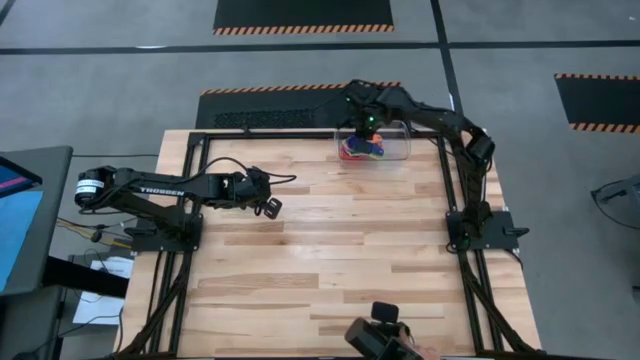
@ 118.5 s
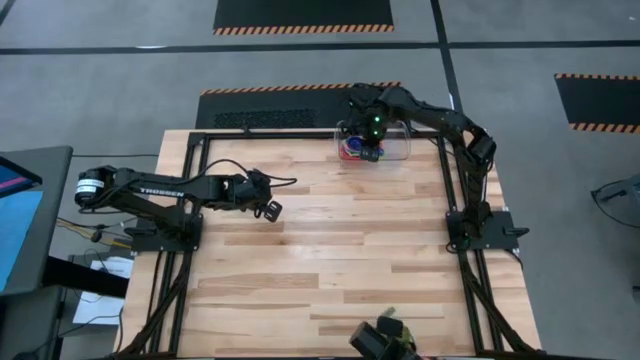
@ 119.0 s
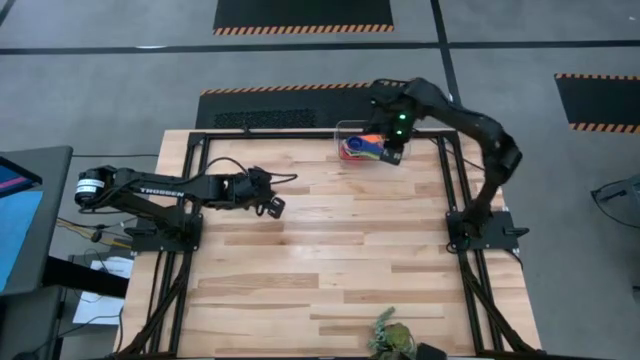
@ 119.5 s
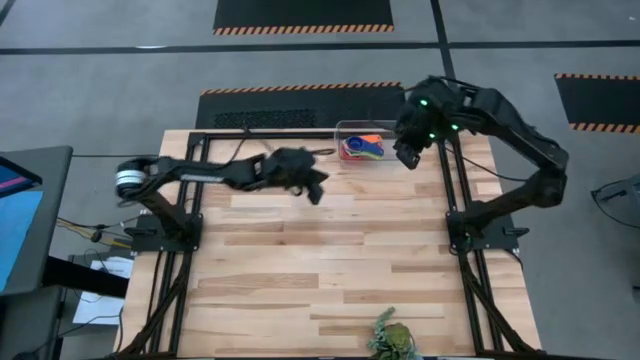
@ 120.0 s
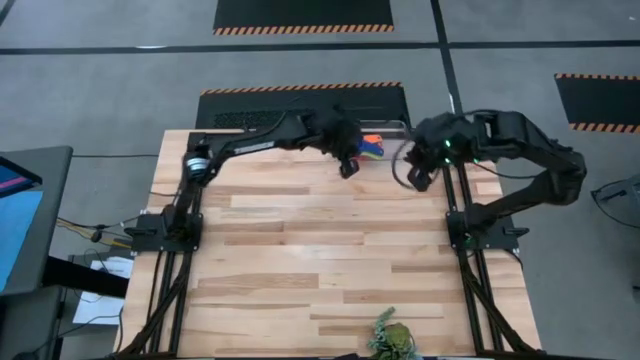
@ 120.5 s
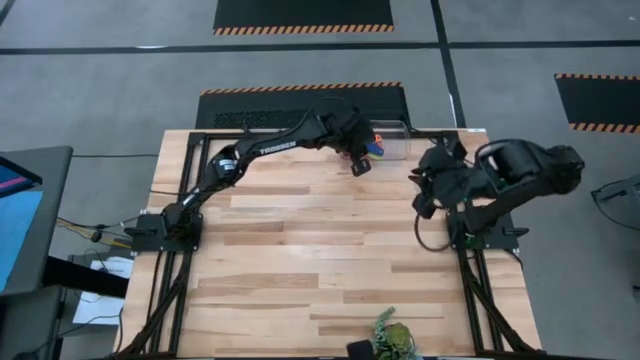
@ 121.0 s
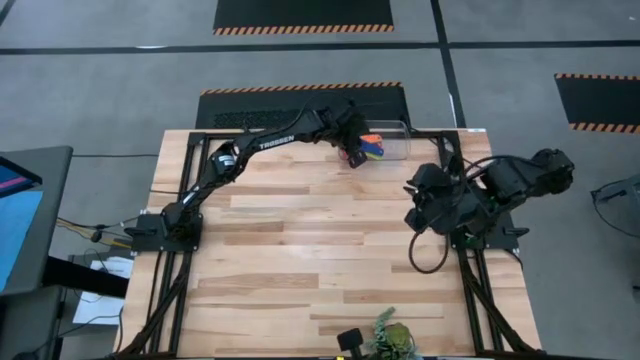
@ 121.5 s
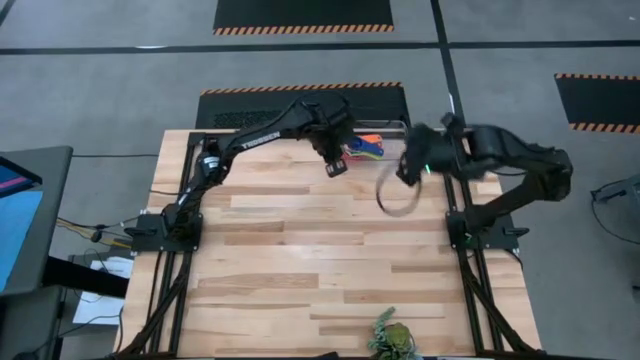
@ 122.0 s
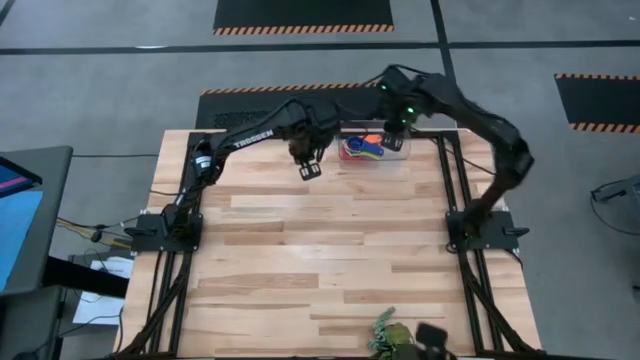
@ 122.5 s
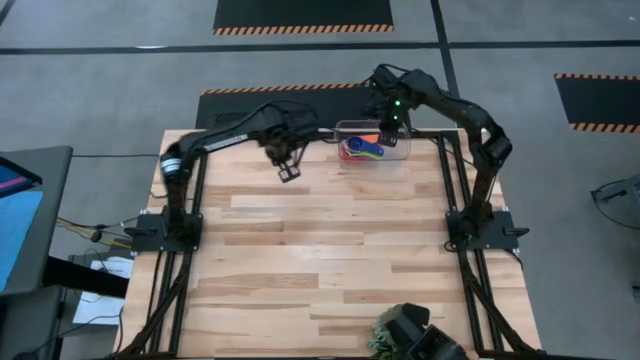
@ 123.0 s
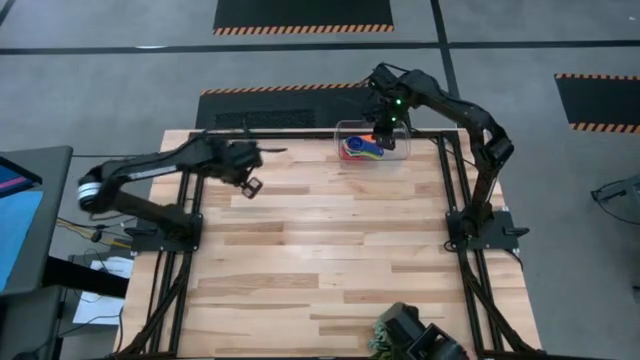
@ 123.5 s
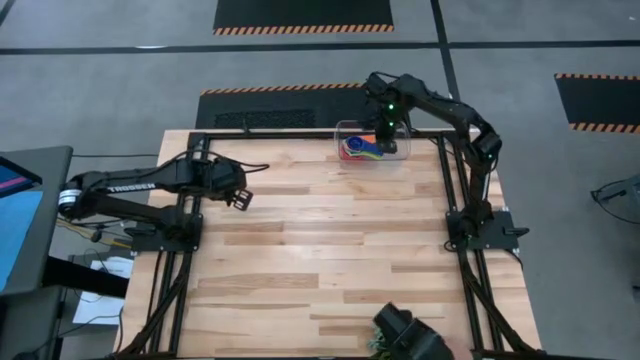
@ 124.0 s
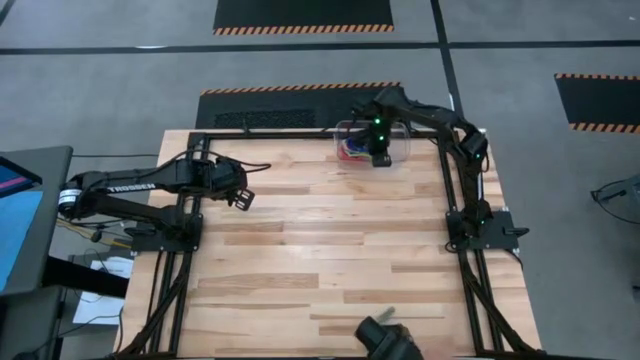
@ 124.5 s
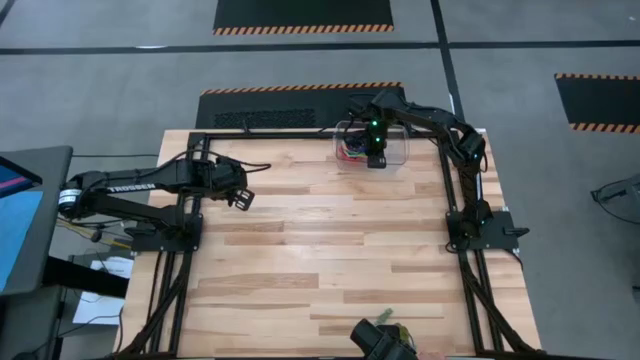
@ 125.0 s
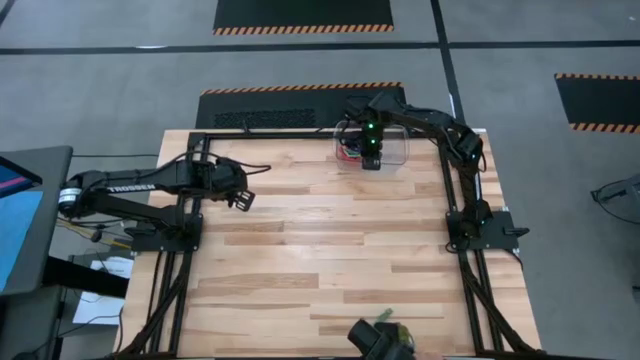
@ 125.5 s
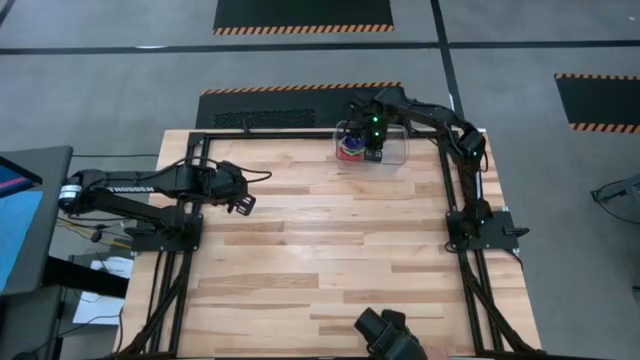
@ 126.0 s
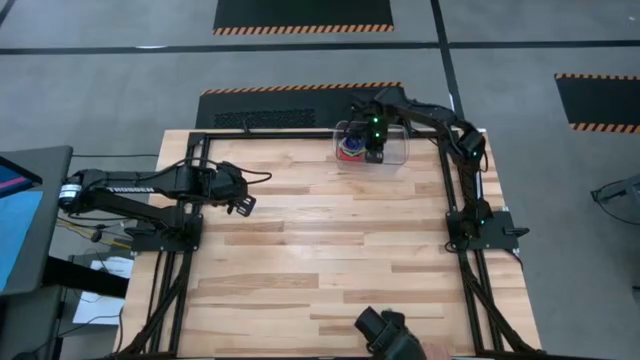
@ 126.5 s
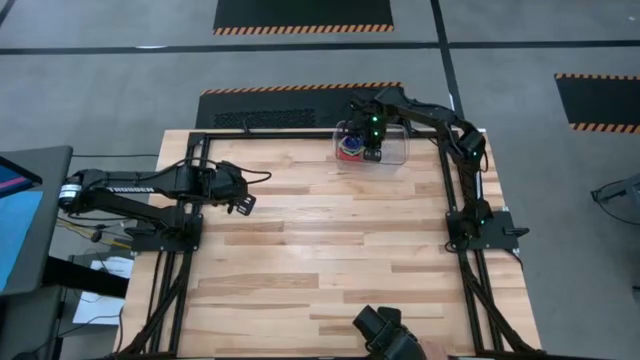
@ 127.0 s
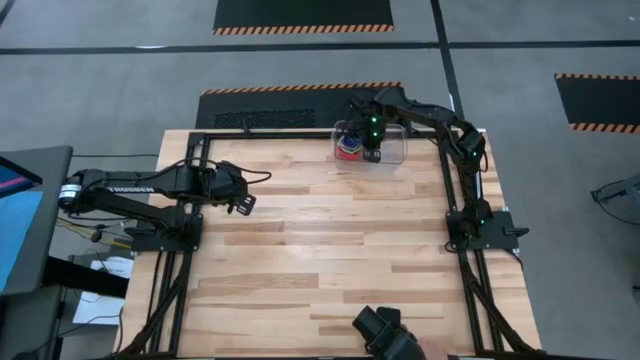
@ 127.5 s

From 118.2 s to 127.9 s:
Task: Nest measuring cups in basket
Adjust the stacked measuring cups in the transparent bin

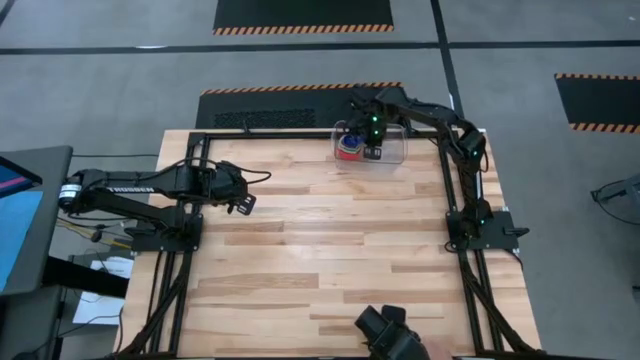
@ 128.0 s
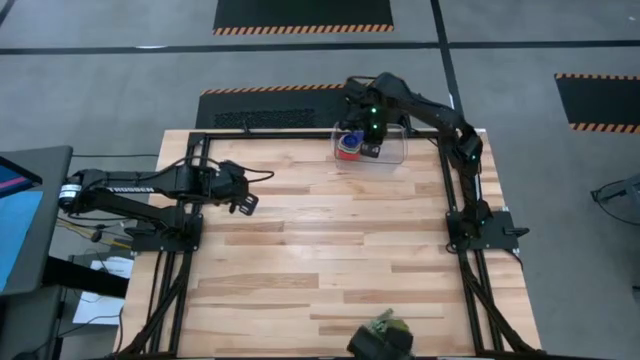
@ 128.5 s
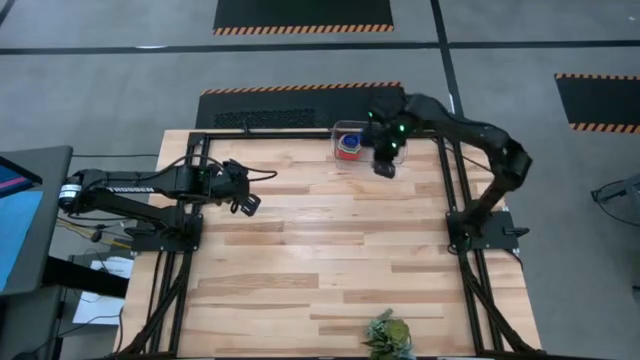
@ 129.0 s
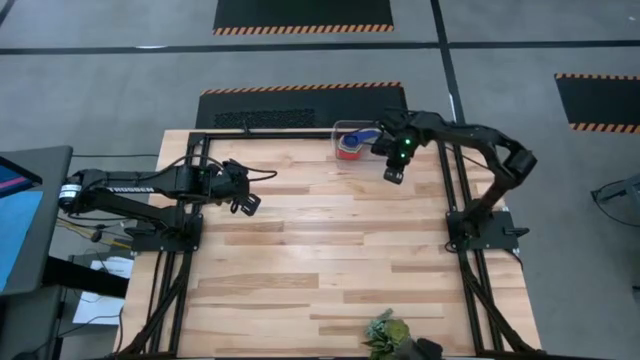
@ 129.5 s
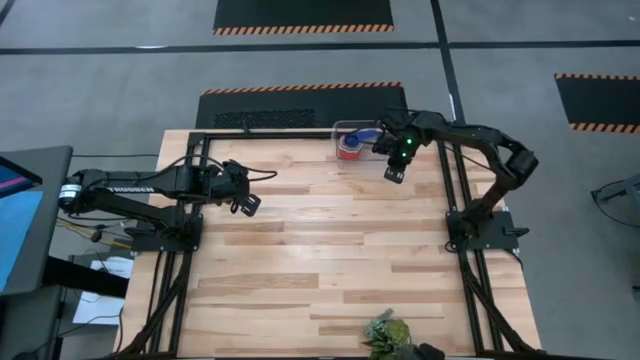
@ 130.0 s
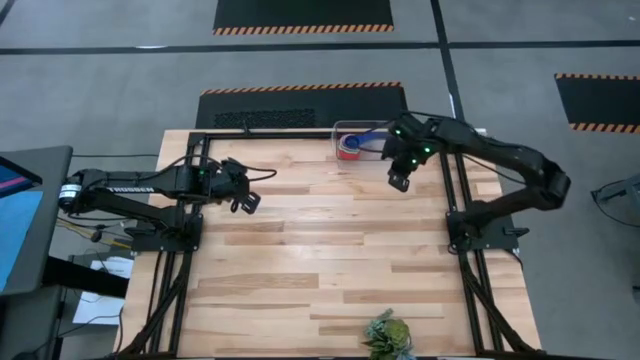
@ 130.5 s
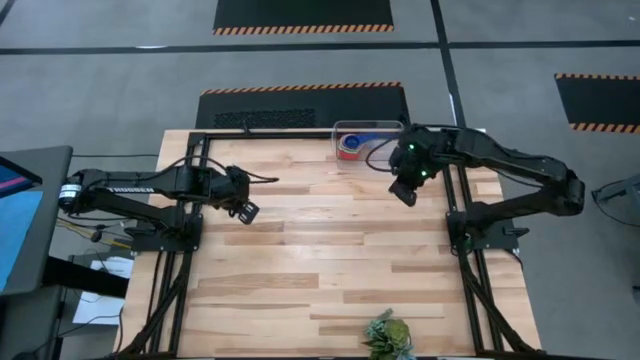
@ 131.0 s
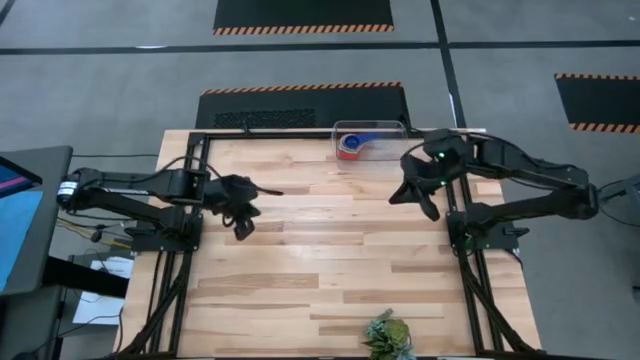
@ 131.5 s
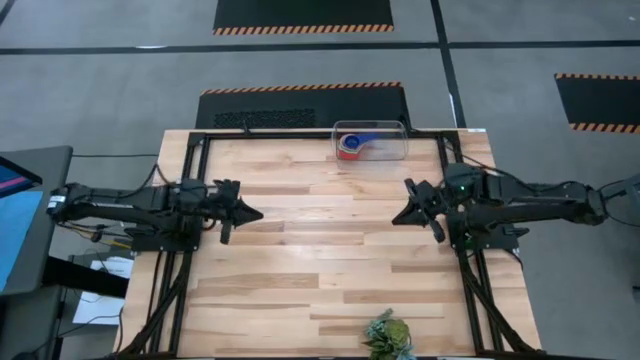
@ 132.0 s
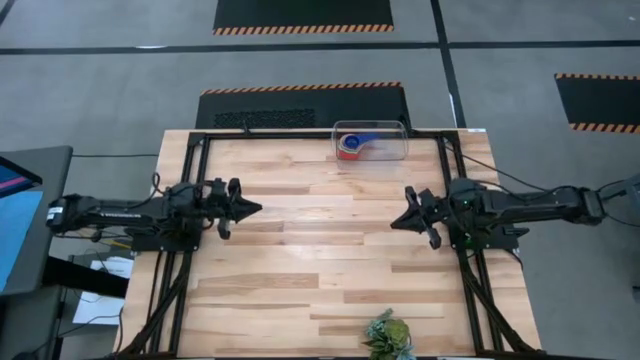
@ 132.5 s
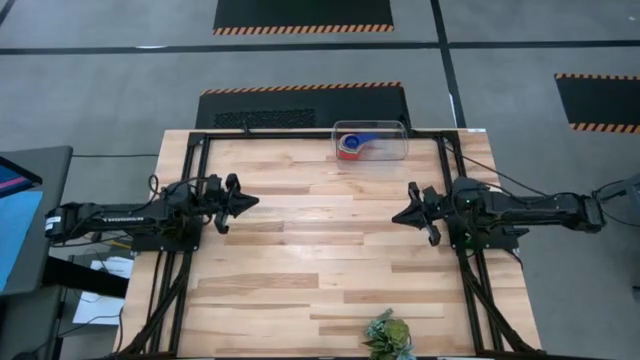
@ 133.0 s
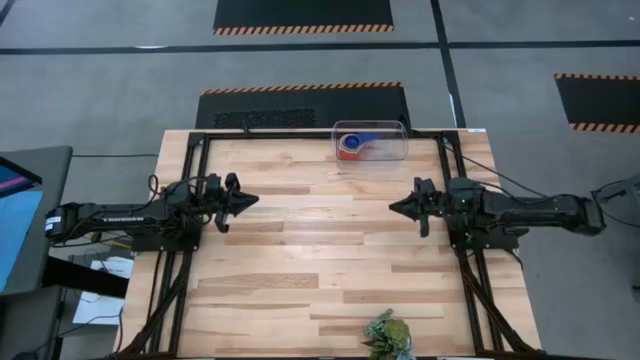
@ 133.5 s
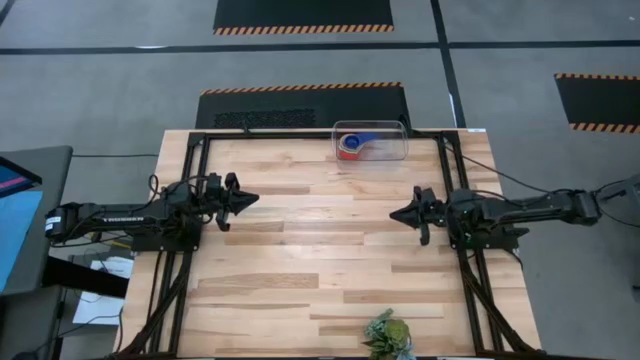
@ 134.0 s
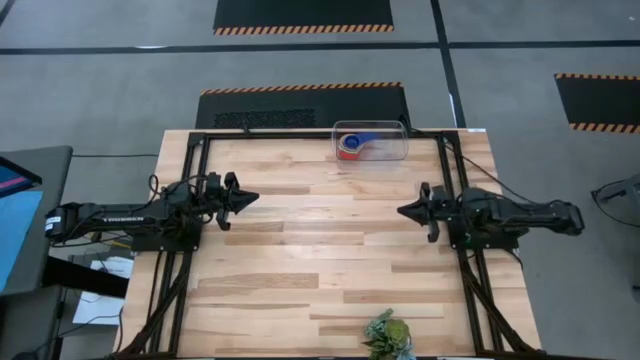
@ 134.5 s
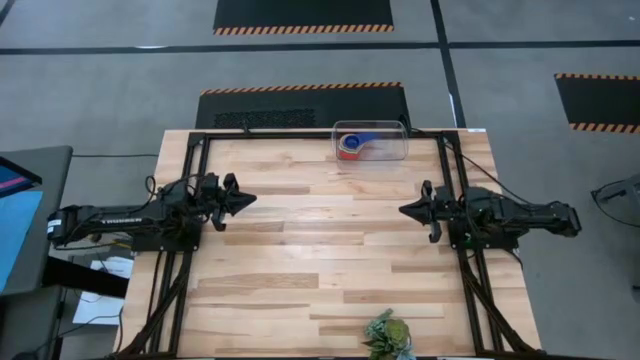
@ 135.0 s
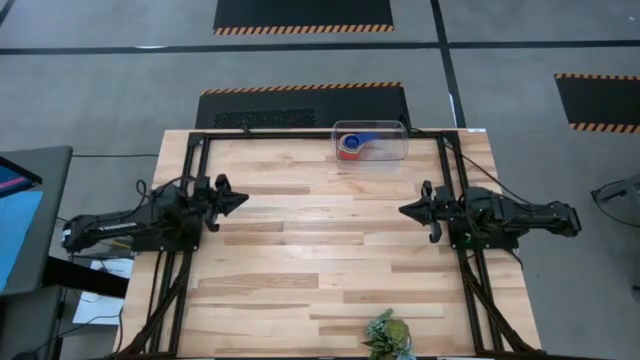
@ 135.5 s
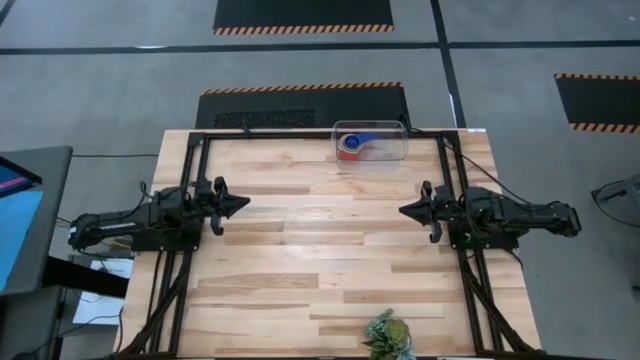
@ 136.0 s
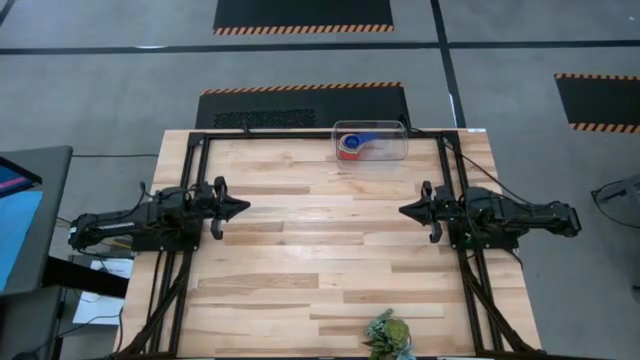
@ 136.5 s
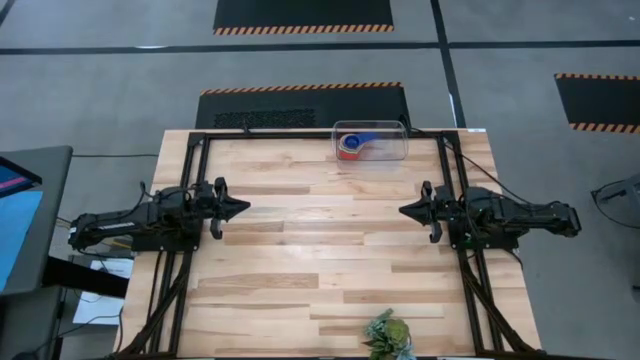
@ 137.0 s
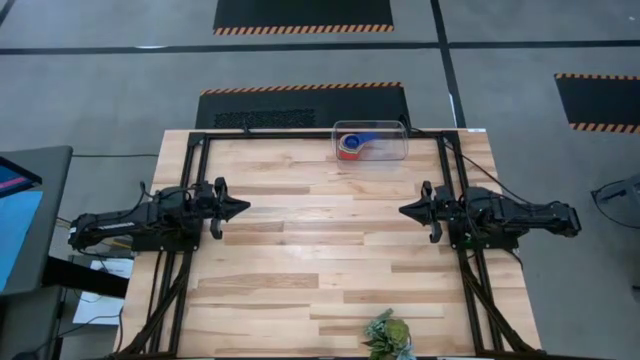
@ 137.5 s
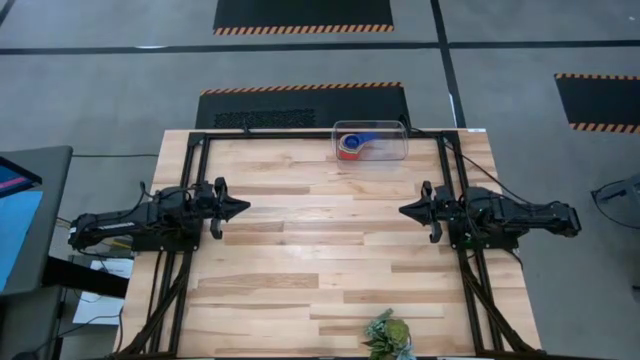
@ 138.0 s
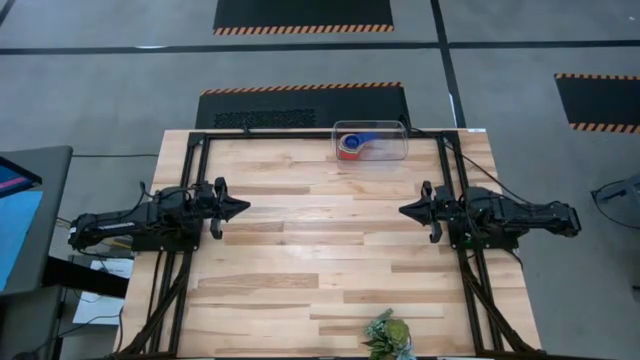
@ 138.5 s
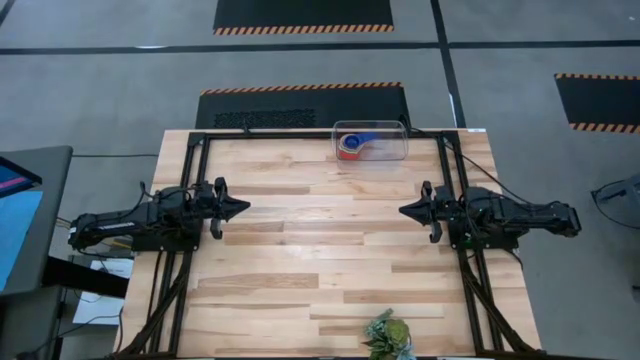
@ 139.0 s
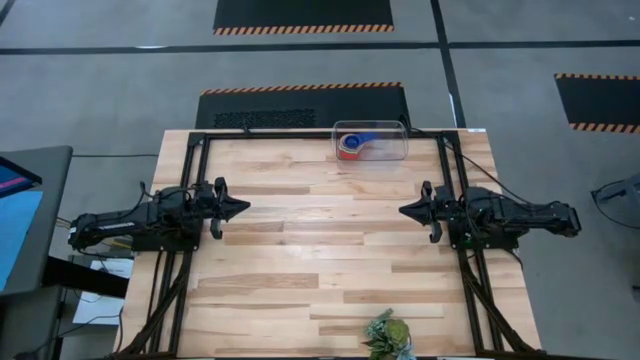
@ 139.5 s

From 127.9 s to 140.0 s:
Return to Home Position
